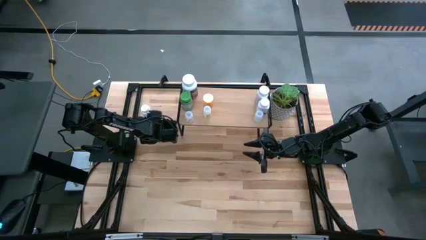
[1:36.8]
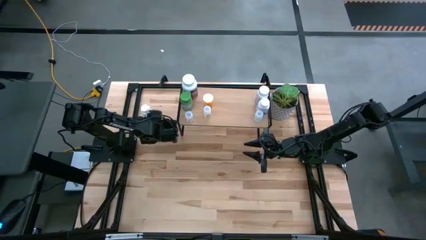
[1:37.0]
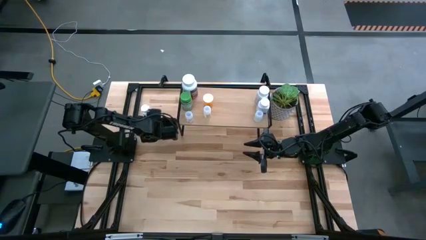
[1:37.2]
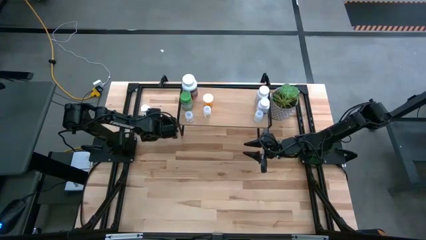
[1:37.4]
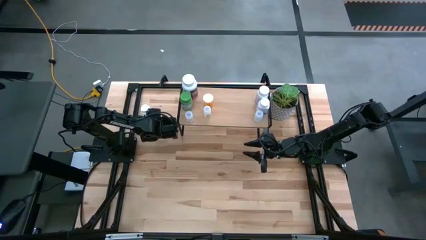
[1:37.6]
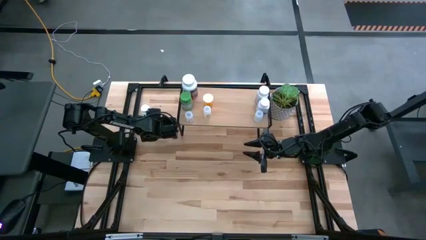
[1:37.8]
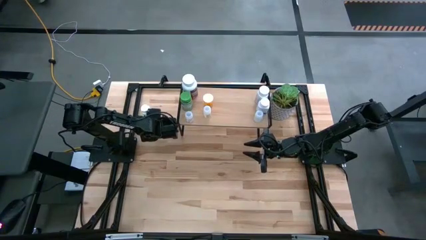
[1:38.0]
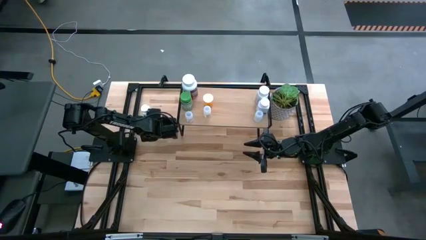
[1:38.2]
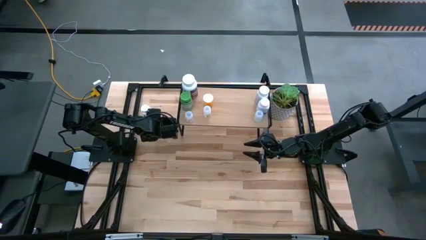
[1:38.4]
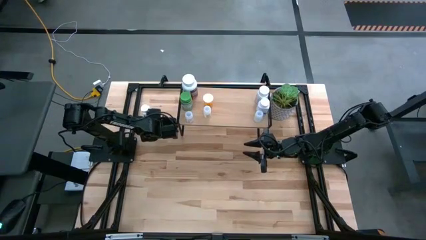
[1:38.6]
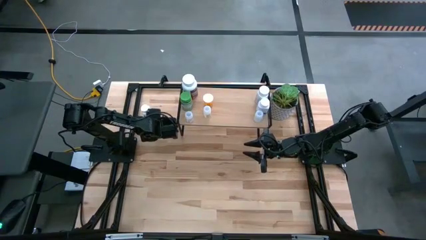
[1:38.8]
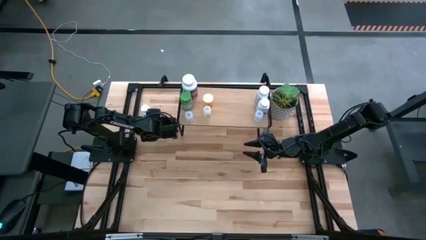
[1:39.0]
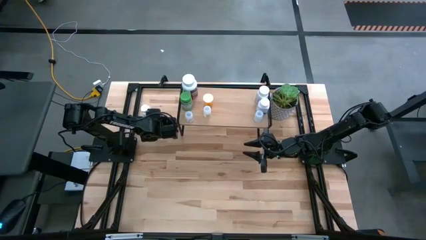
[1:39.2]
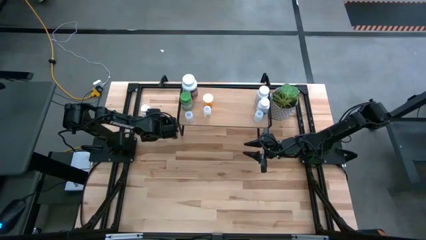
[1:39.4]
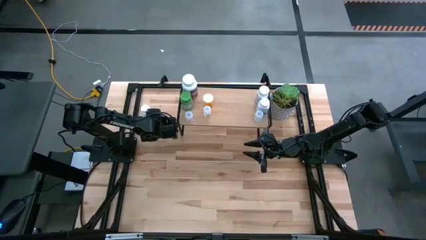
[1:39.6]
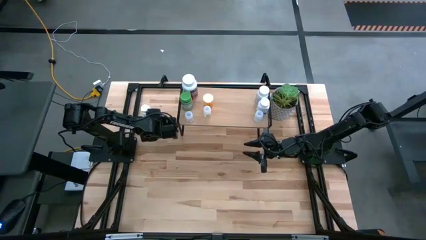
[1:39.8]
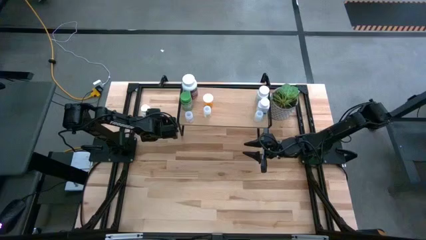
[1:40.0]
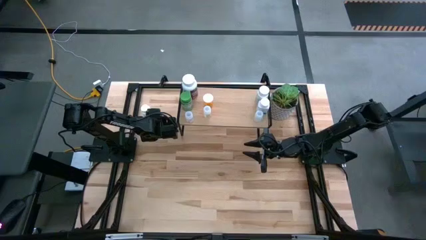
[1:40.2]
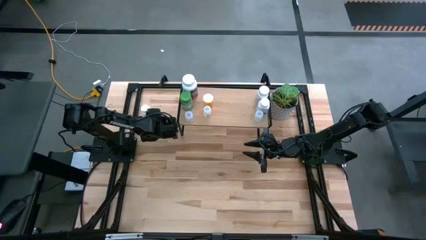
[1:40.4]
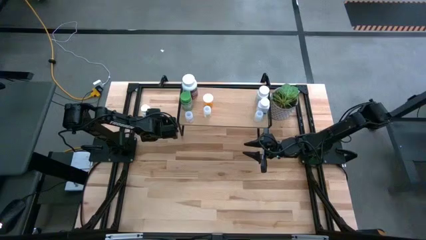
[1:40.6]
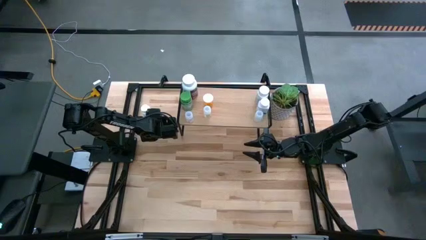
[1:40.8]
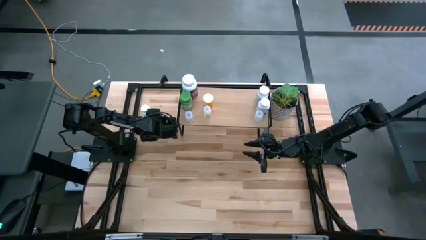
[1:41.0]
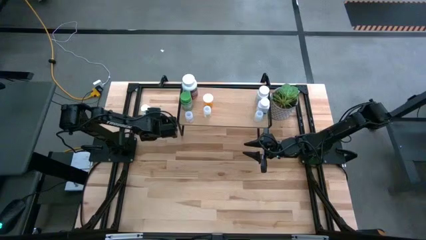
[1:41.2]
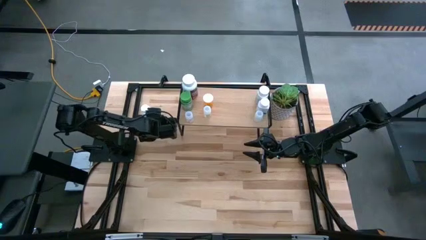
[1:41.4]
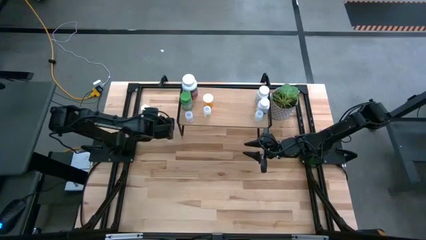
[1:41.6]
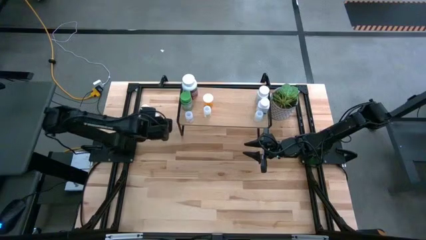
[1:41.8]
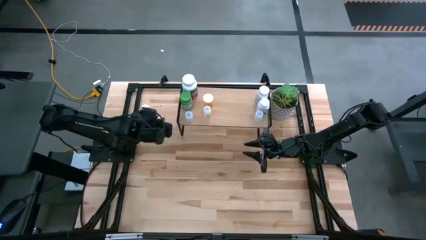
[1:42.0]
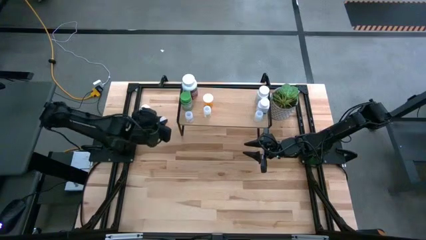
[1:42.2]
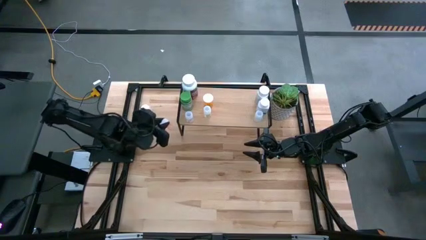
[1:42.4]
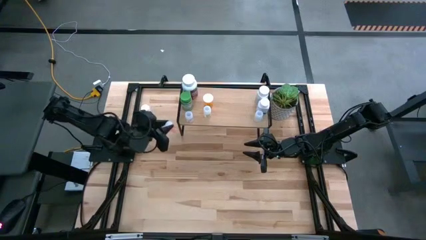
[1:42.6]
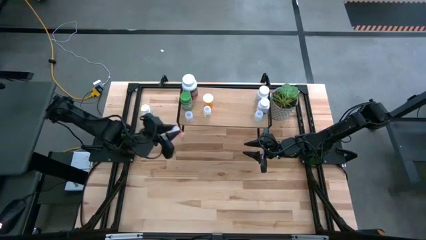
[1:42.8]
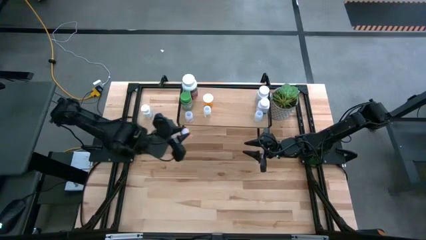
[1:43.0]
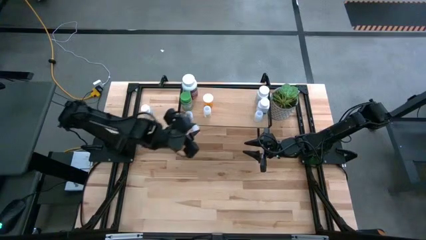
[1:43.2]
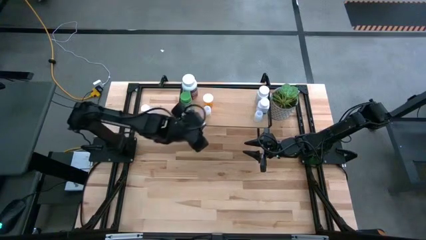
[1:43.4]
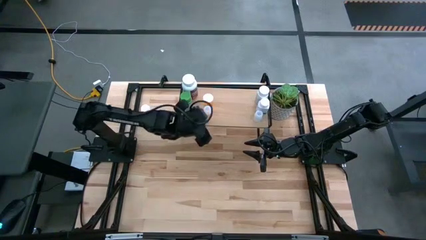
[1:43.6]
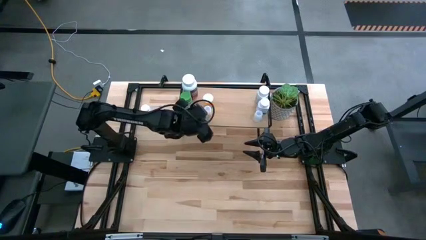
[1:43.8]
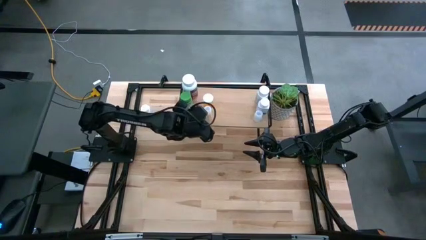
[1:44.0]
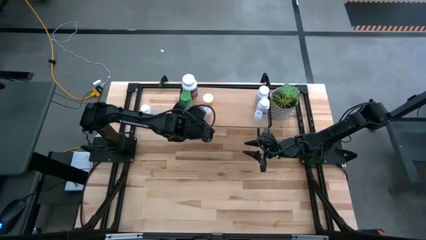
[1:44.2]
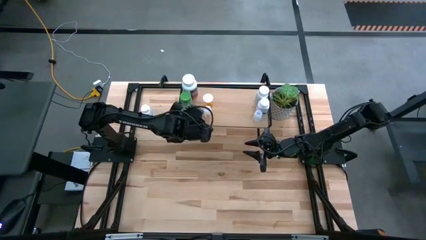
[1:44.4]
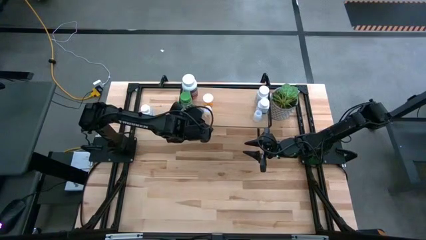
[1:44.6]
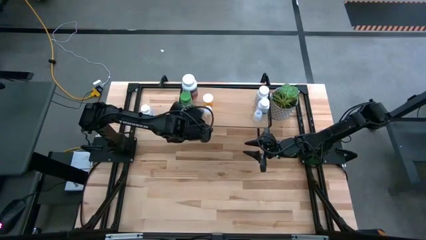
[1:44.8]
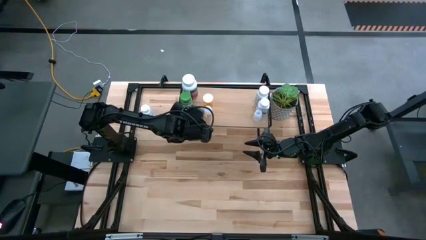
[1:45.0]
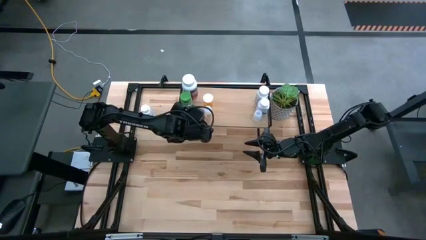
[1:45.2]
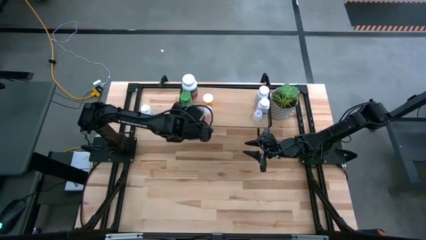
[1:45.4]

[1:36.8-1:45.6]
Task: Pick and place medicine bottles onto shelf by color
Put the pink pill bottle on the shelf

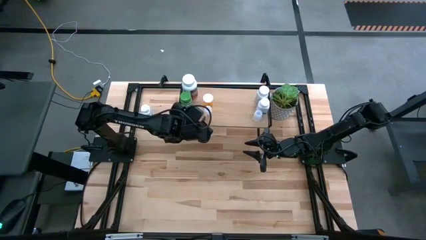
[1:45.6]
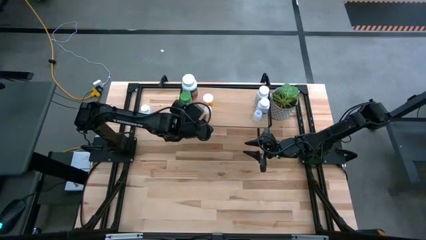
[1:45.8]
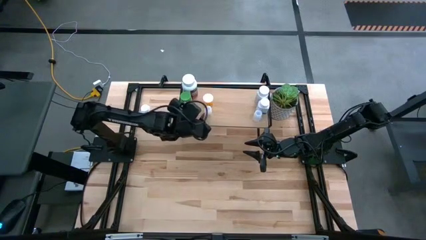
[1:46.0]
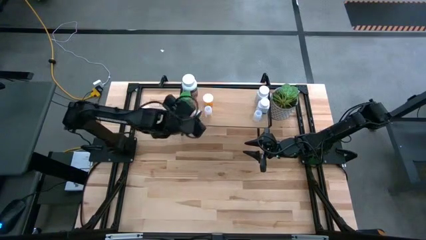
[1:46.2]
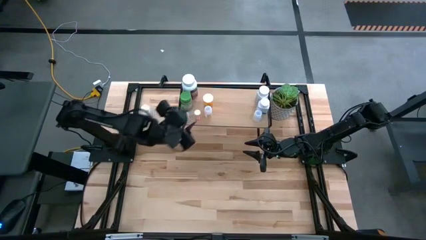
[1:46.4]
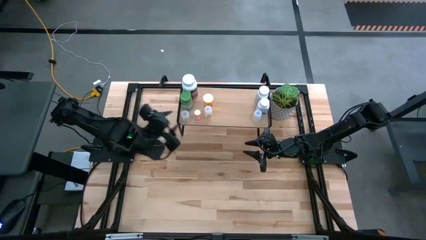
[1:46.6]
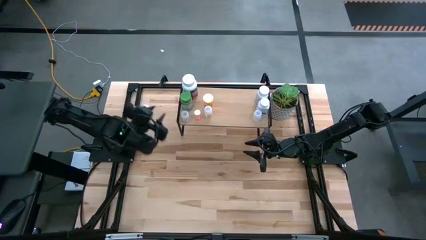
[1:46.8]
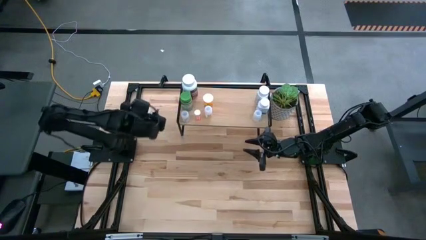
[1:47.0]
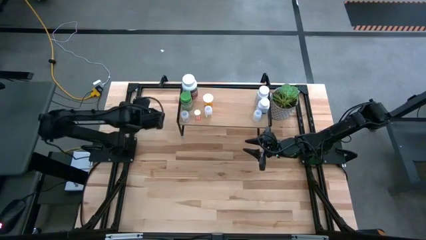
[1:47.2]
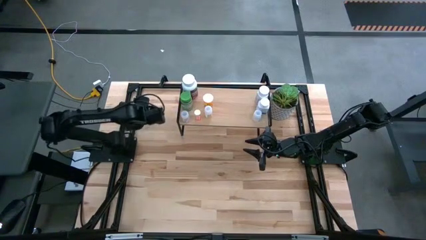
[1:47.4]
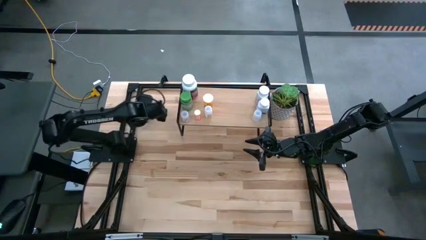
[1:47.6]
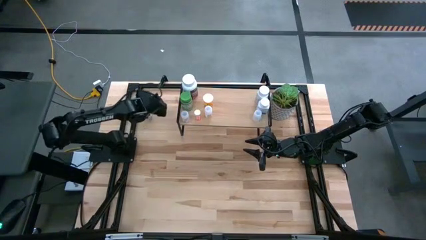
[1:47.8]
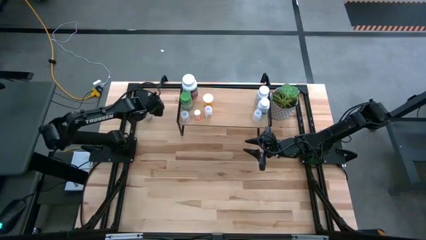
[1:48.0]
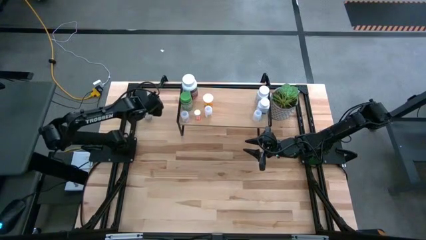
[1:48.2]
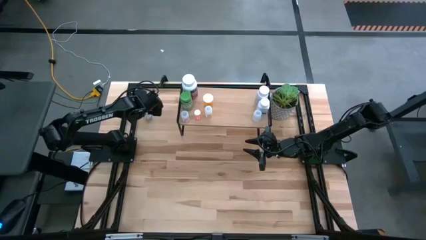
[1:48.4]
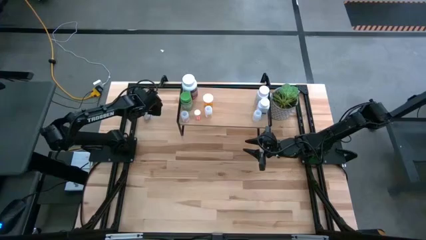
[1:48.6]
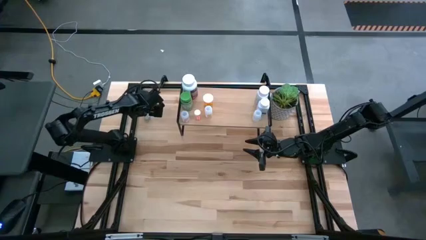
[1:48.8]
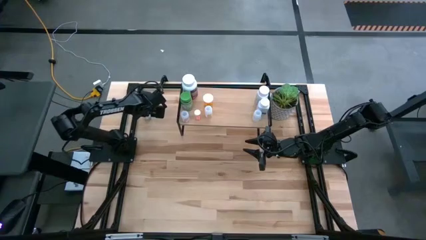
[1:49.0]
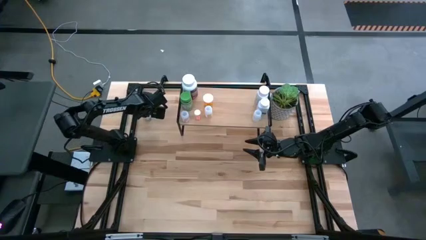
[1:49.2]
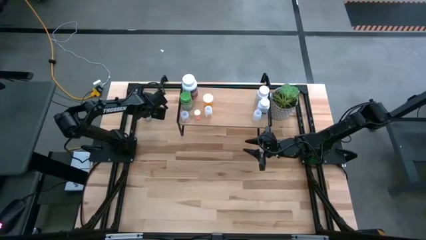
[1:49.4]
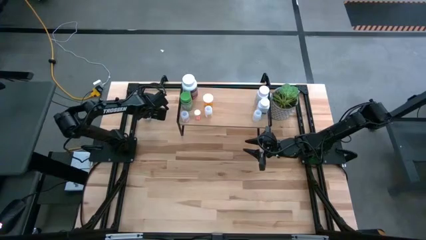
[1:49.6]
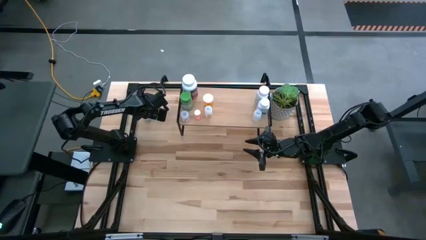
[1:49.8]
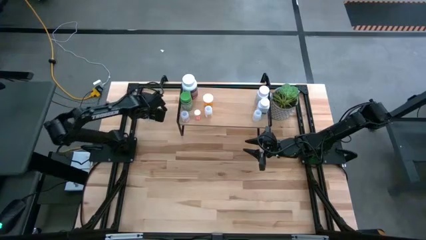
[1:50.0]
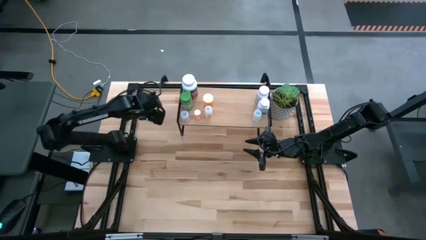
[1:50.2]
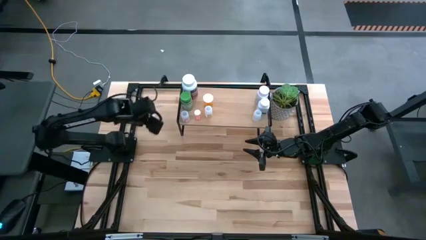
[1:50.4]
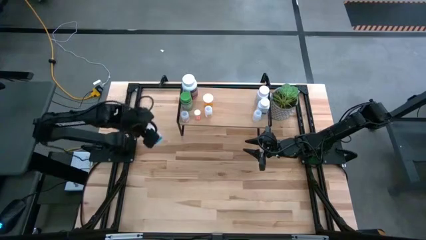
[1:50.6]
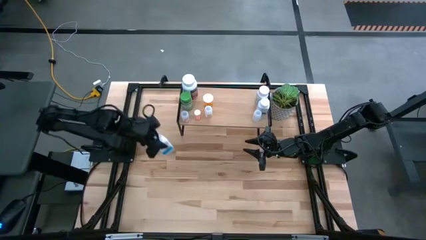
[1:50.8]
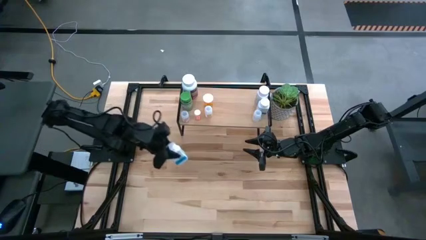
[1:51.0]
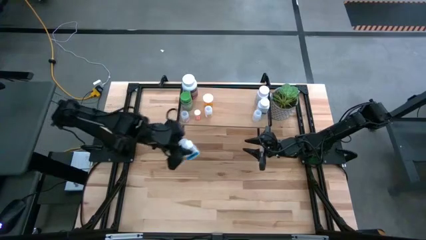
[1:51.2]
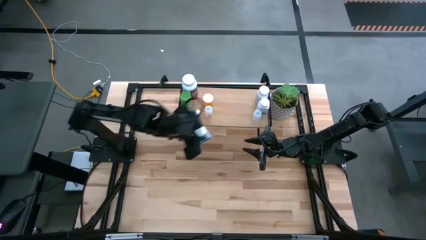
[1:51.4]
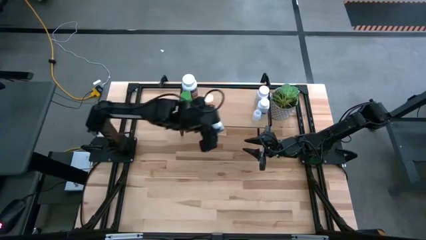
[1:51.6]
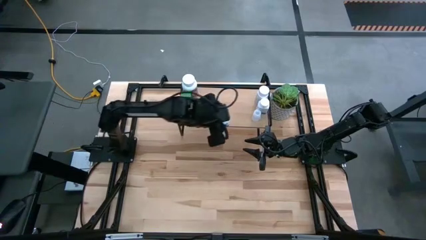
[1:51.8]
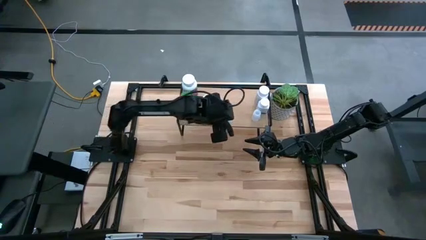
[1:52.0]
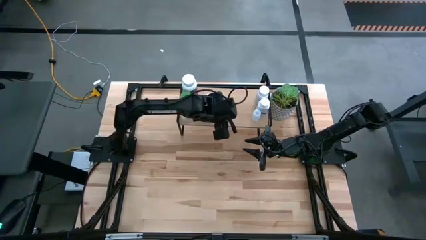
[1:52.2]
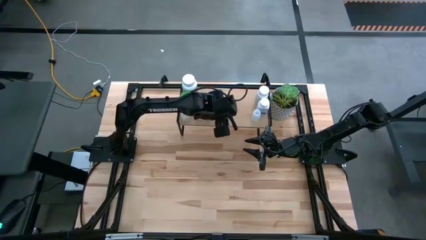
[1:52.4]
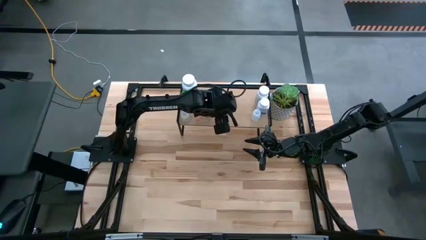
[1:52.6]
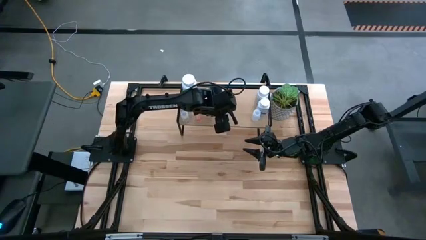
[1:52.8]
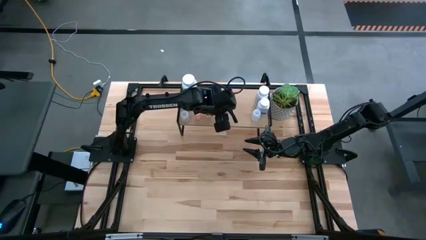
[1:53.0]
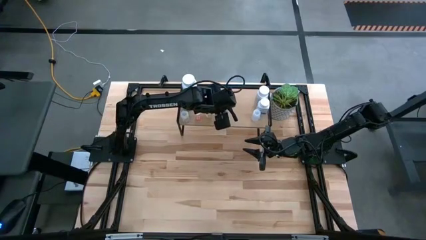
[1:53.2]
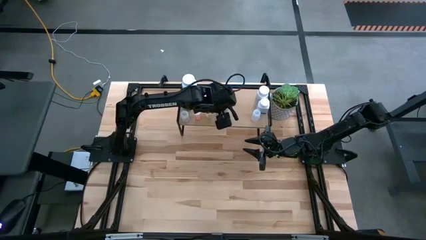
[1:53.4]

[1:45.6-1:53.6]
Put the white medicine bottle on the shelf
